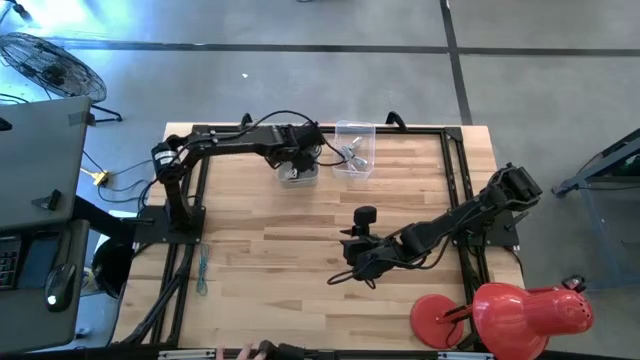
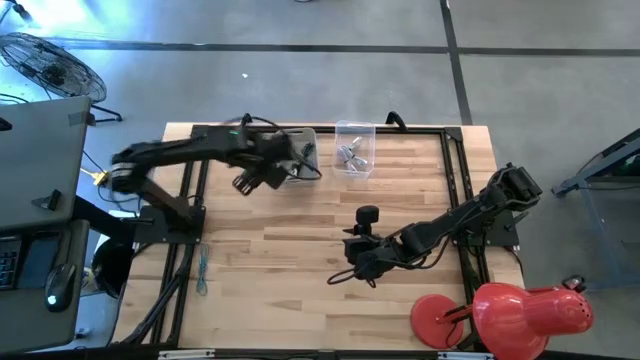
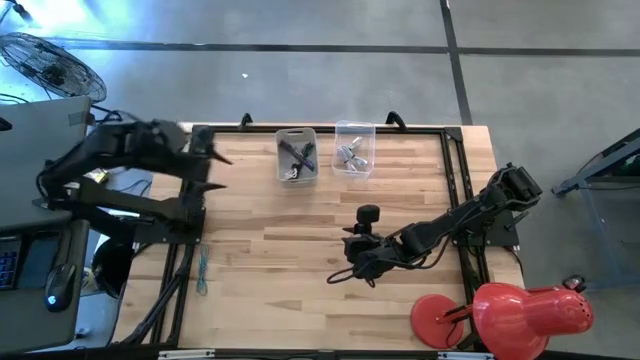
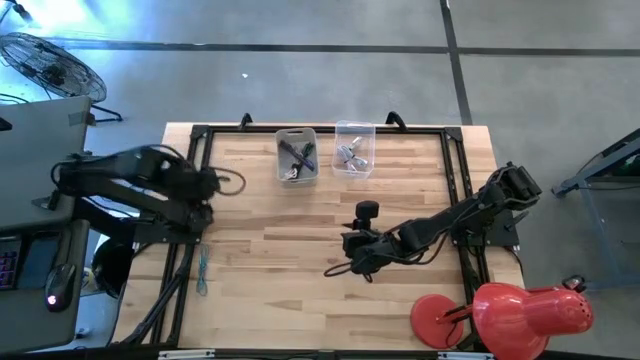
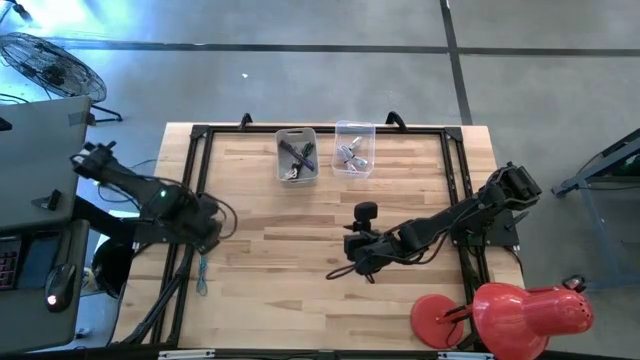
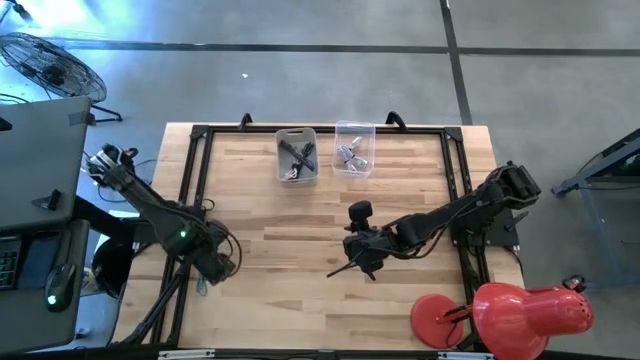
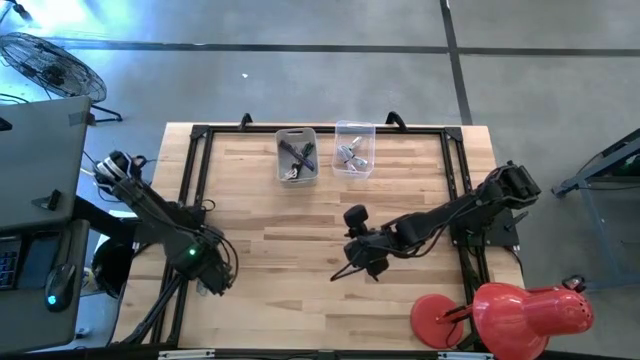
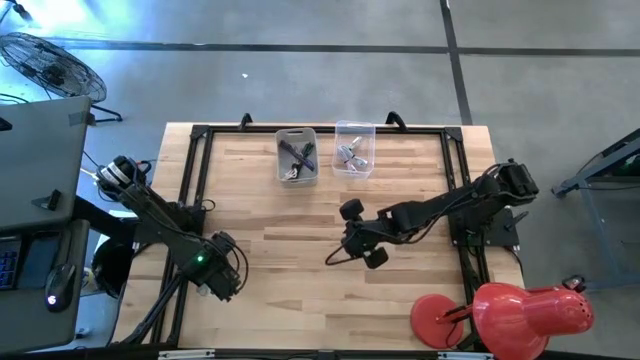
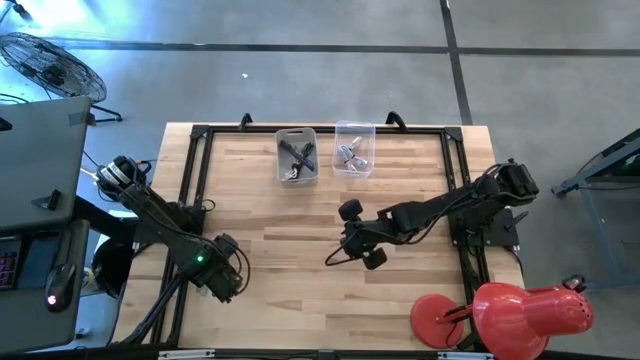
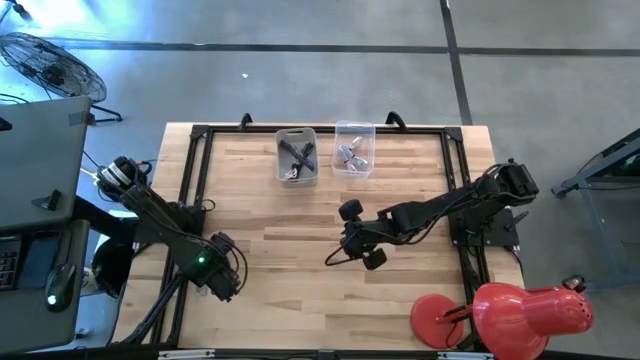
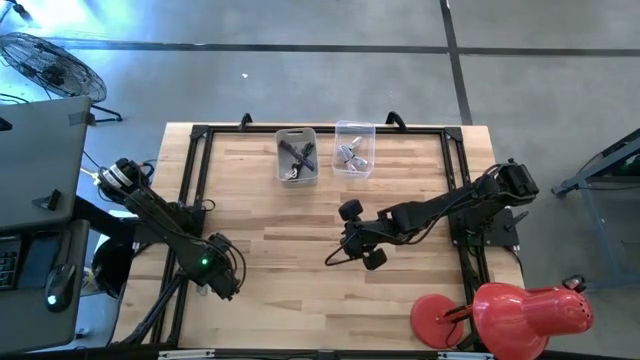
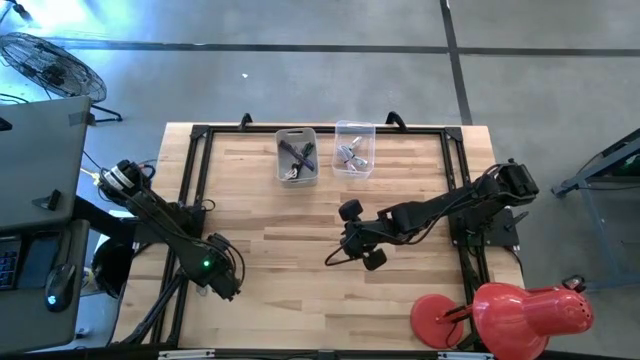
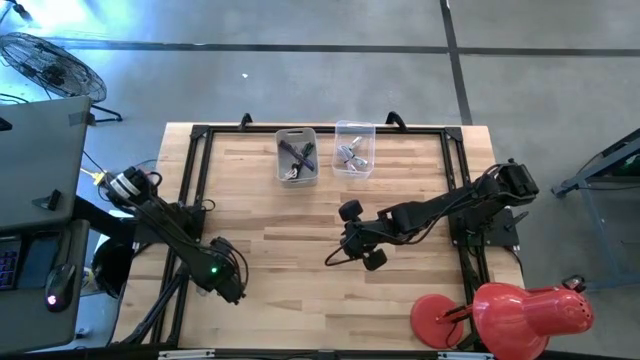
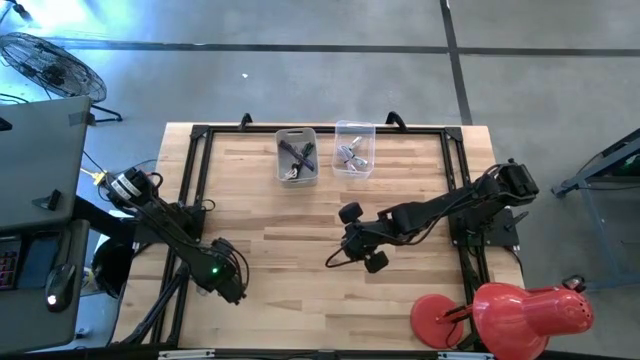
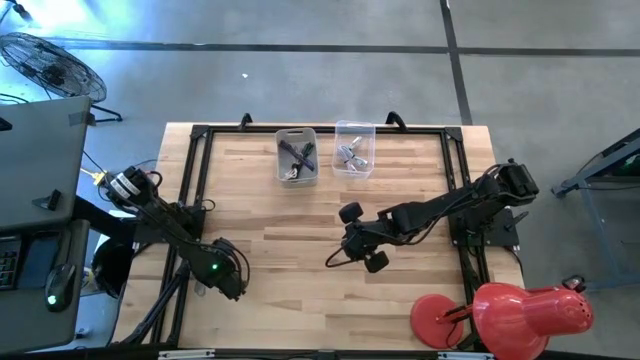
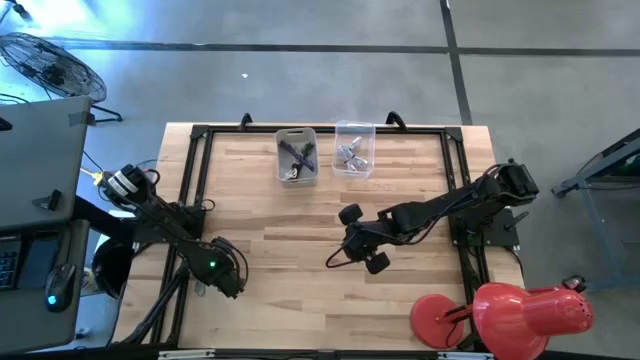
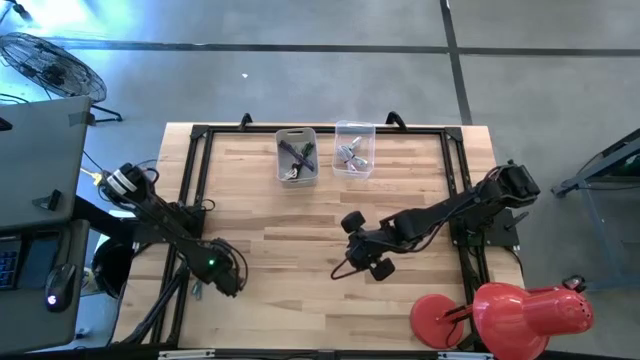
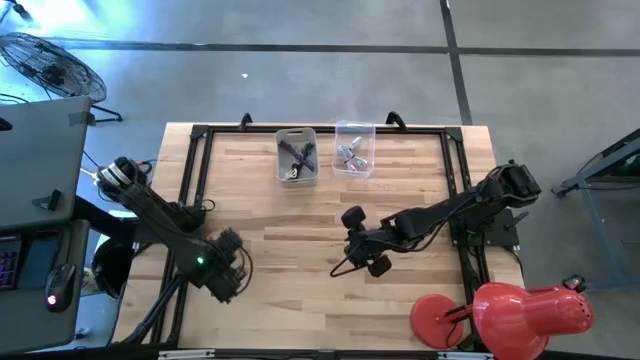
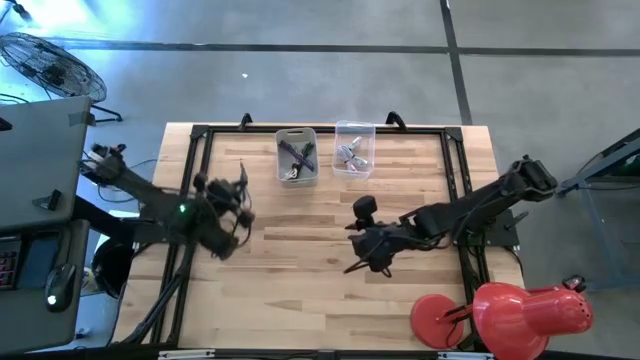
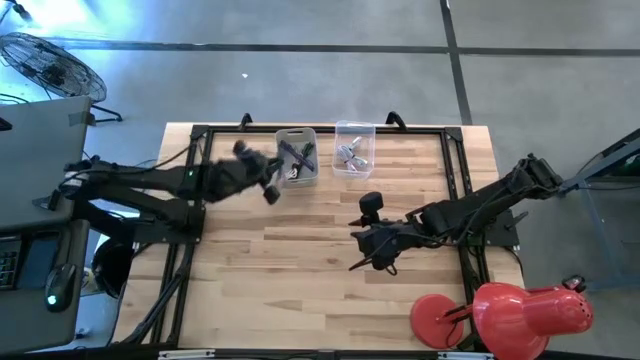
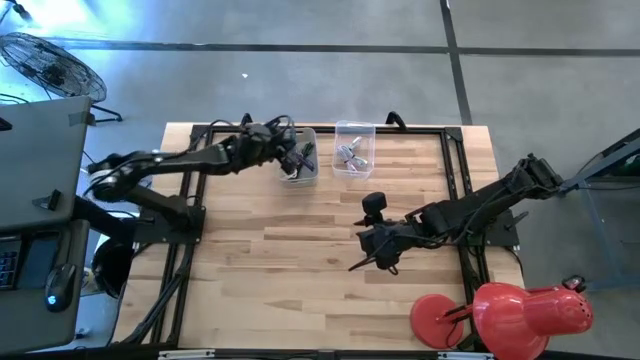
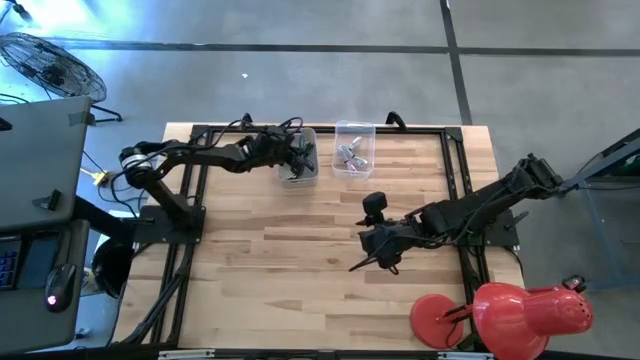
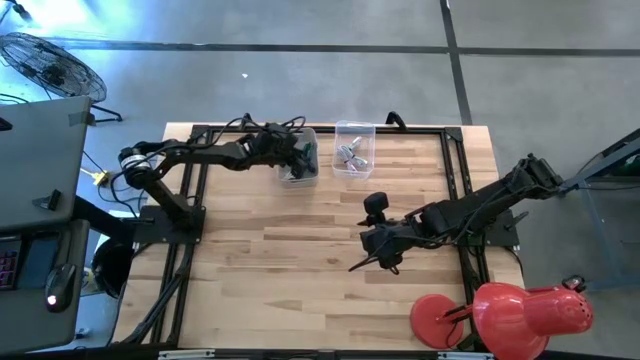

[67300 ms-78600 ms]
Task: Pick & Place USB Port
Put the light blue charger cable into the grey bin

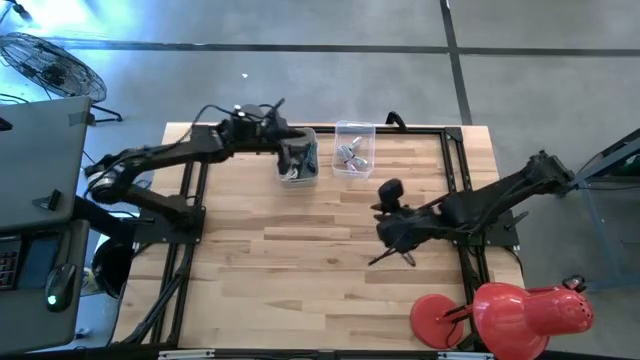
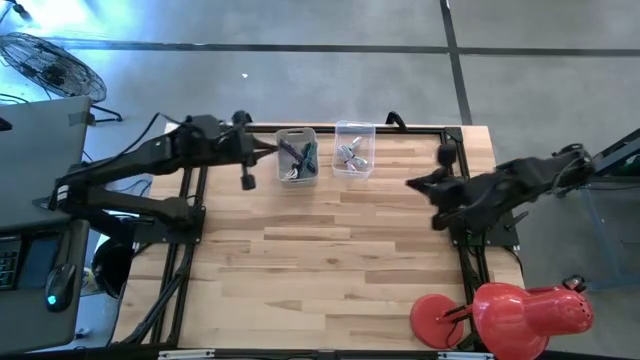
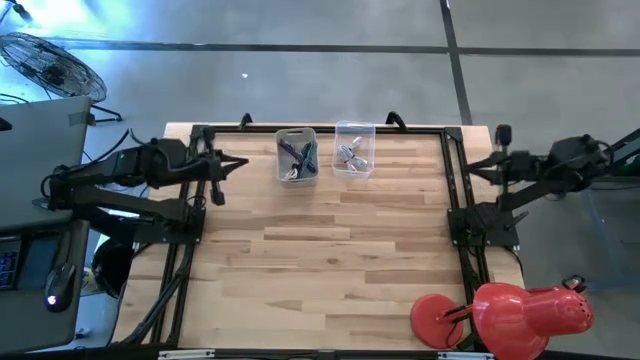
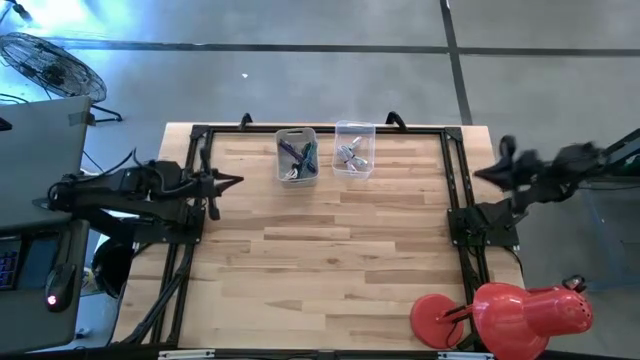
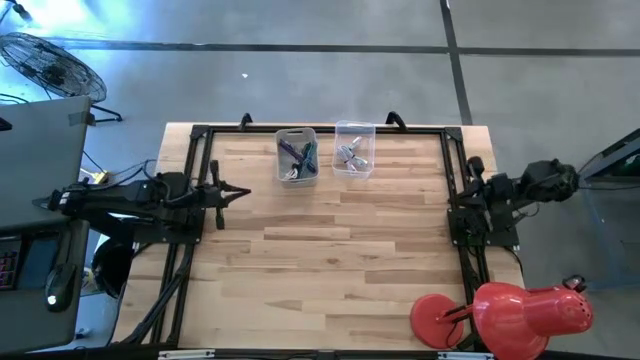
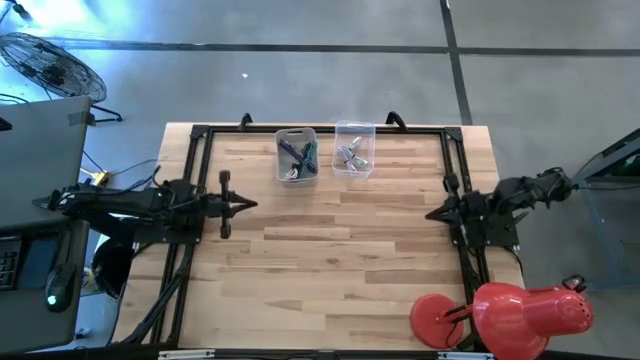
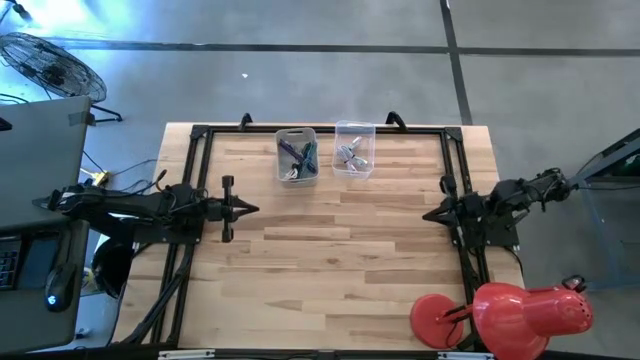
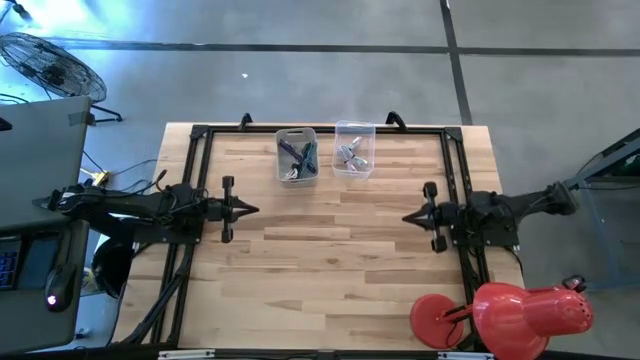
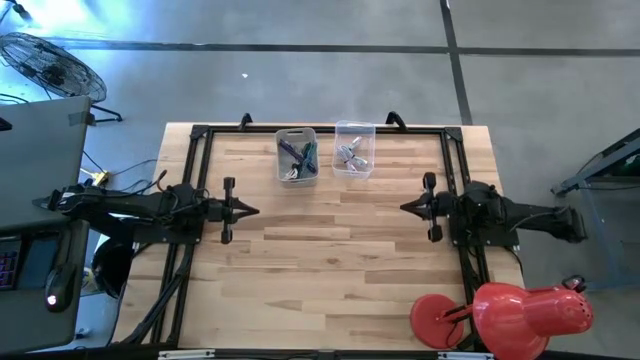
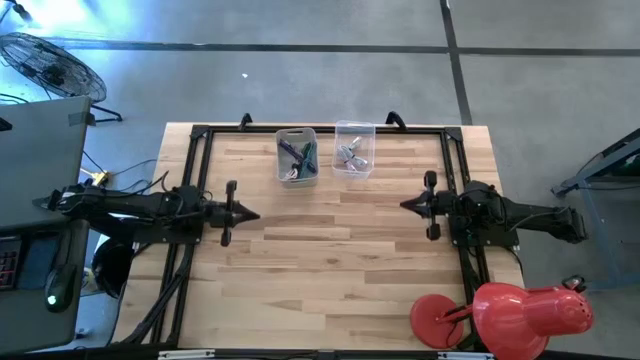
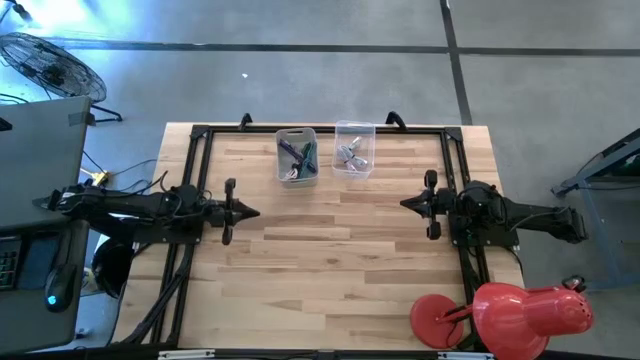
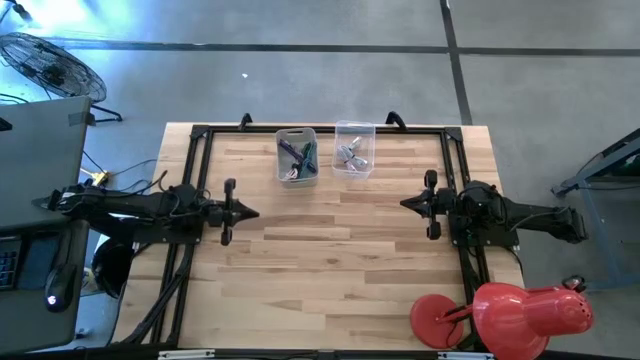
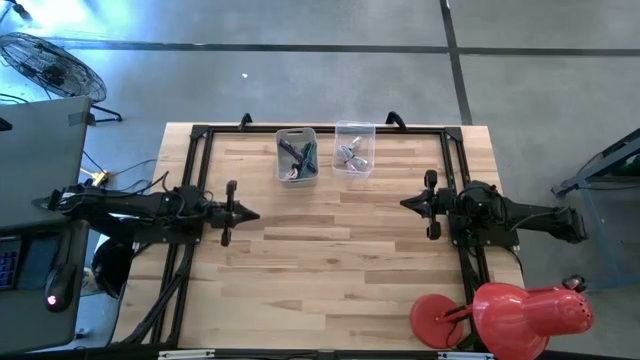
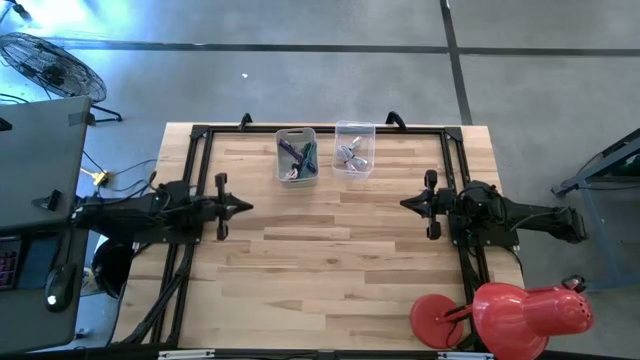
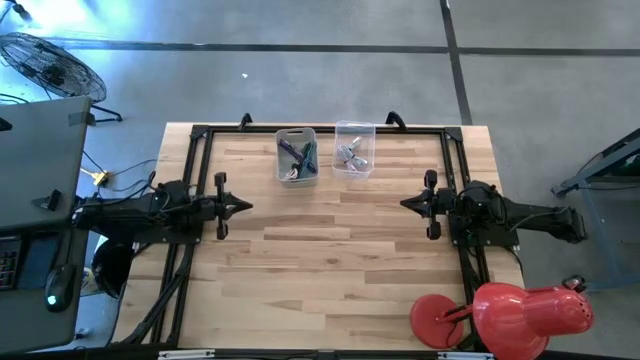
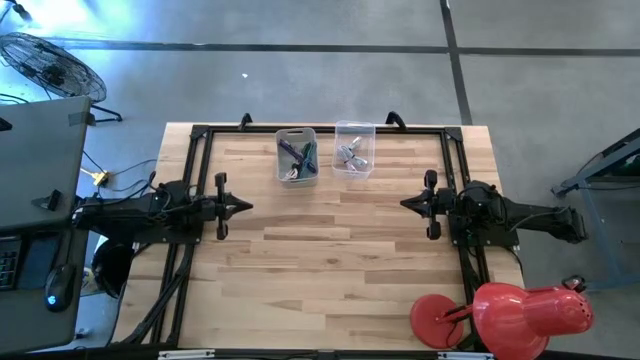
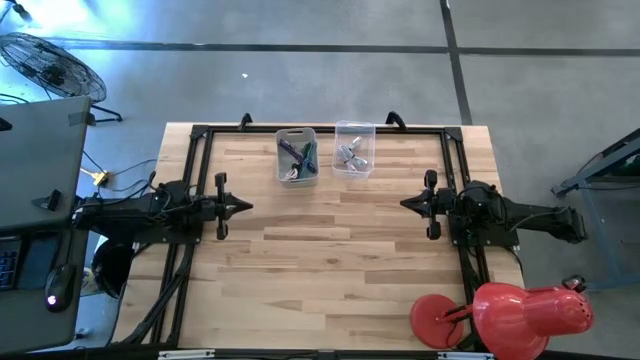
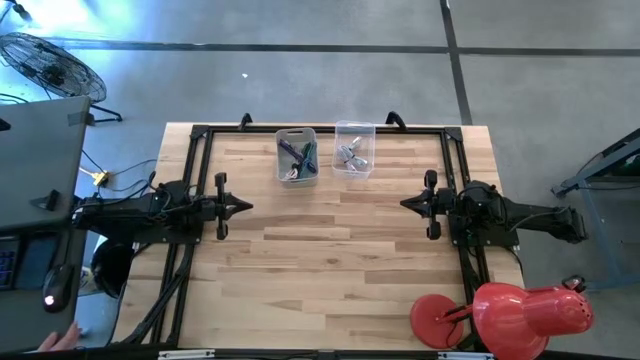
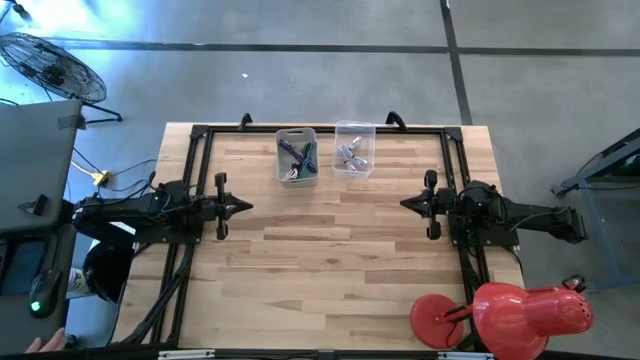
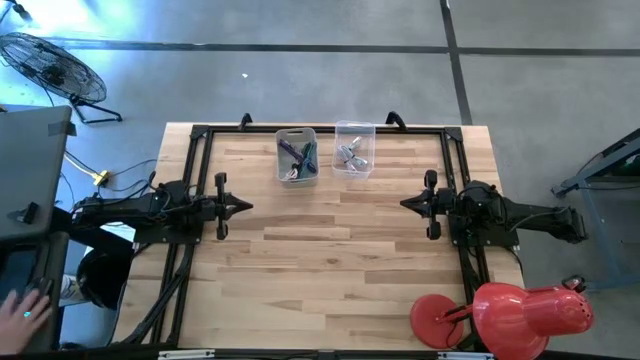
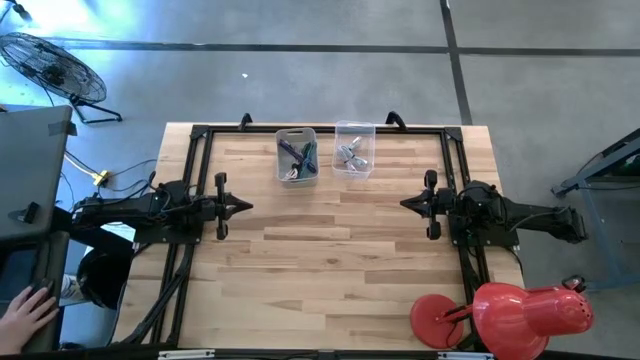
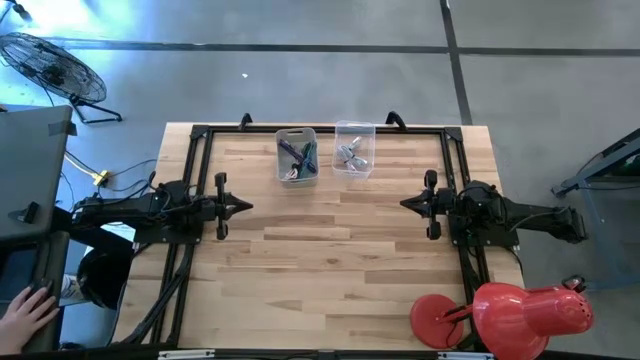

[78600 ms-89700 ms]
Return to Home Position
